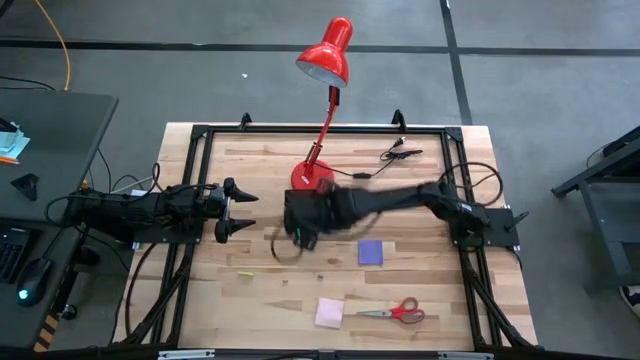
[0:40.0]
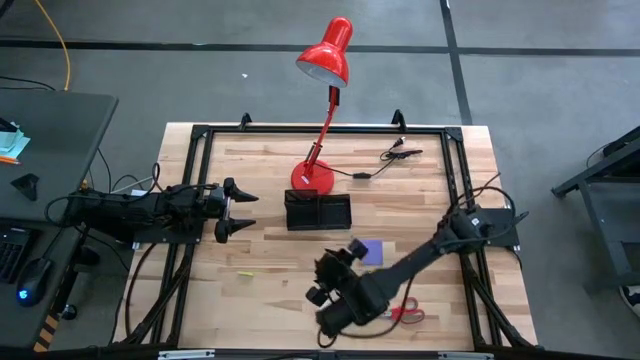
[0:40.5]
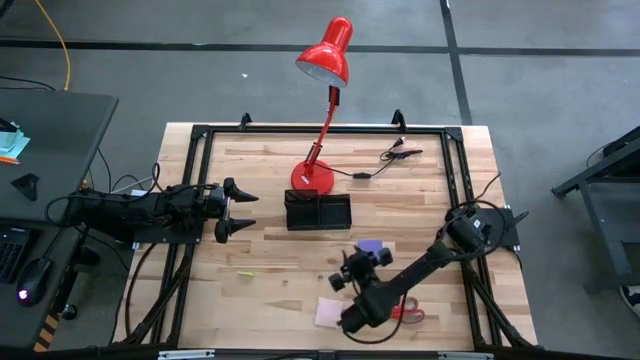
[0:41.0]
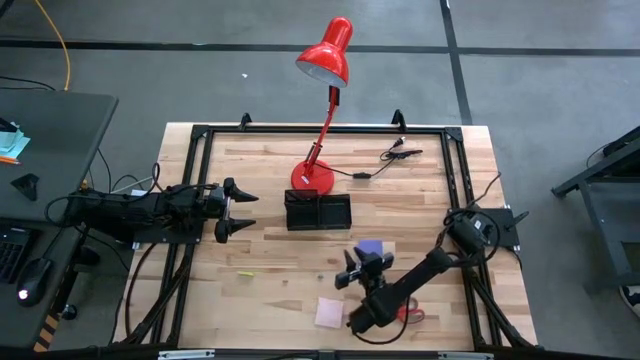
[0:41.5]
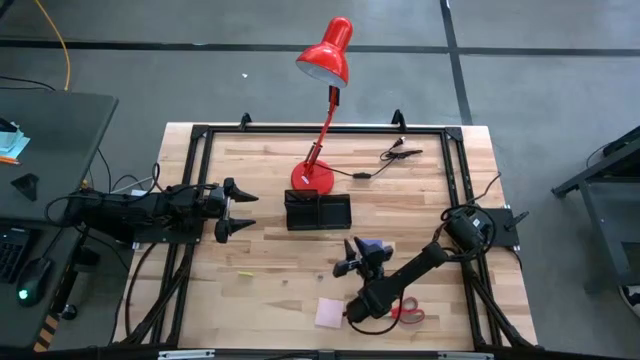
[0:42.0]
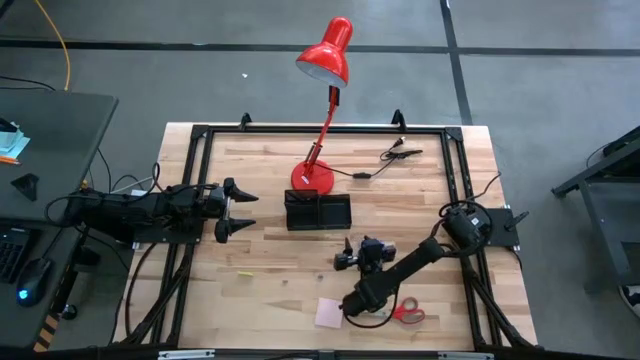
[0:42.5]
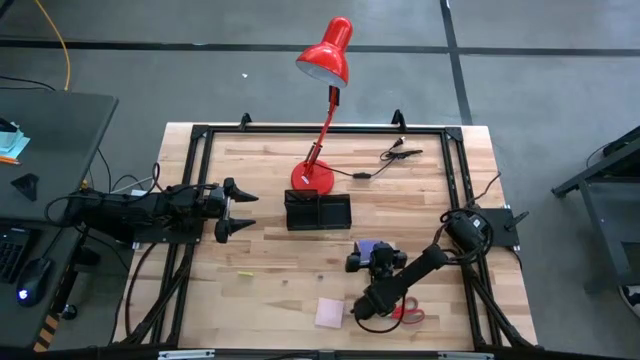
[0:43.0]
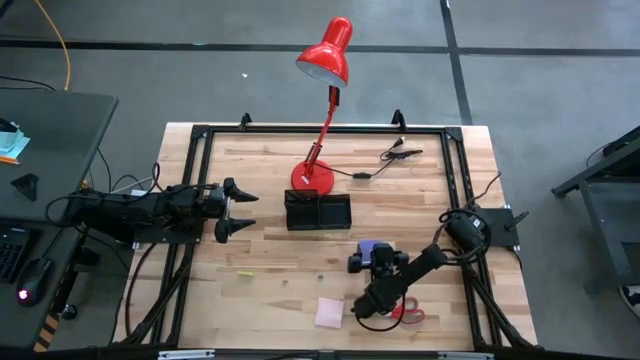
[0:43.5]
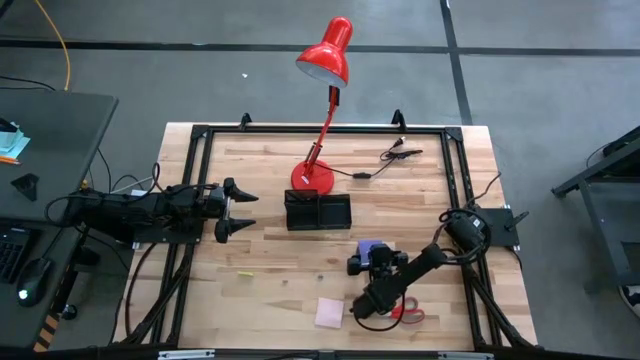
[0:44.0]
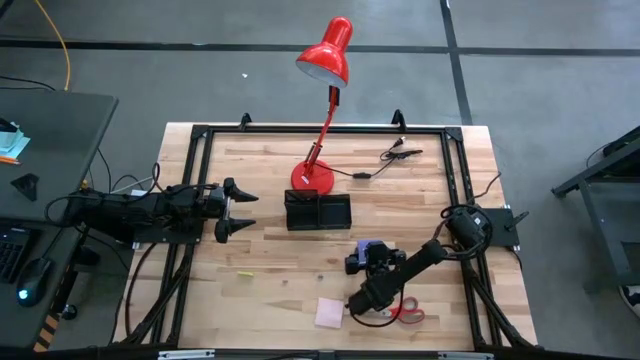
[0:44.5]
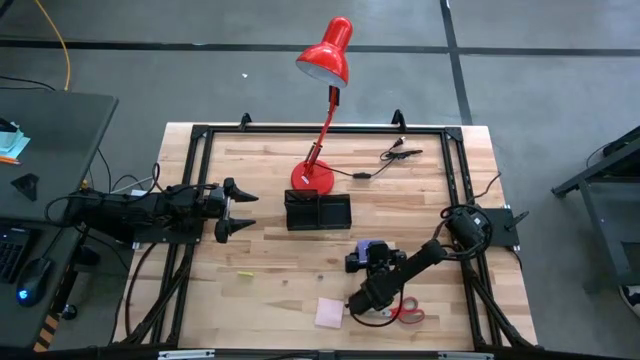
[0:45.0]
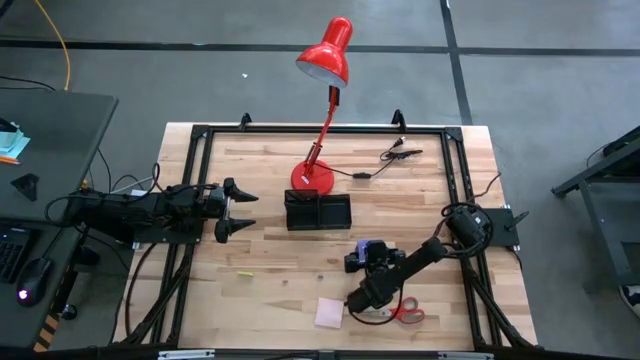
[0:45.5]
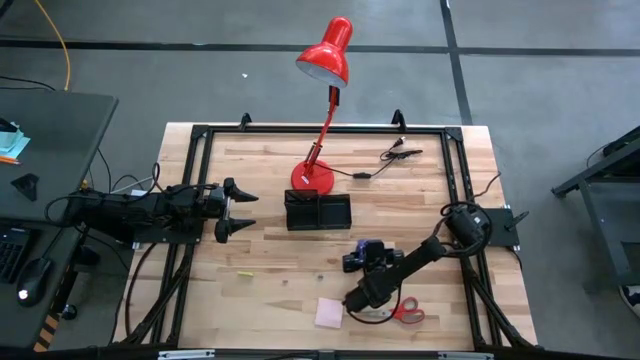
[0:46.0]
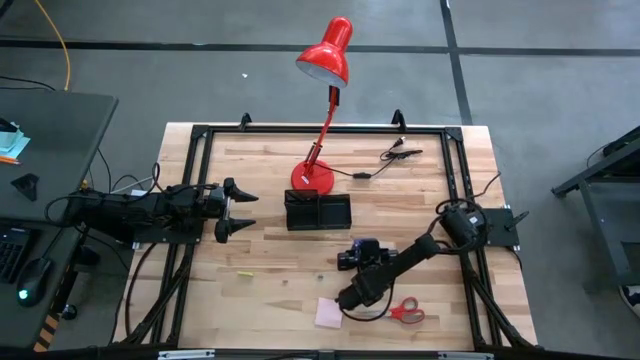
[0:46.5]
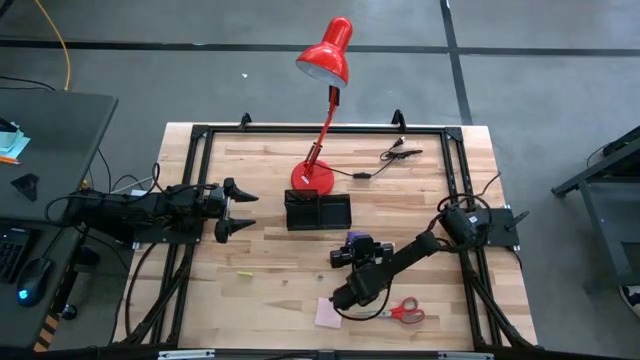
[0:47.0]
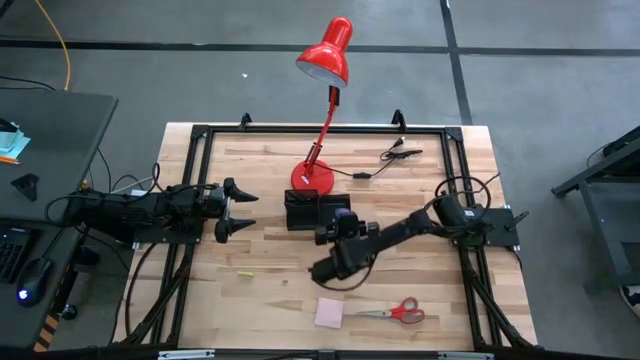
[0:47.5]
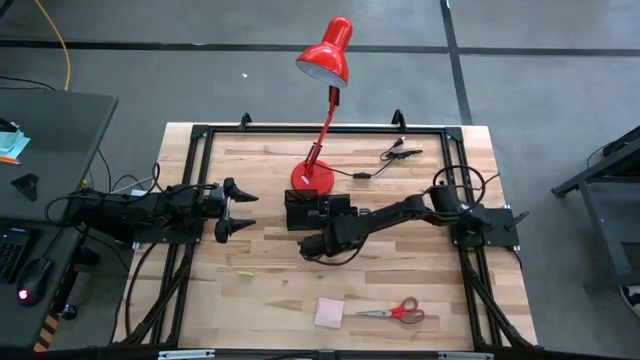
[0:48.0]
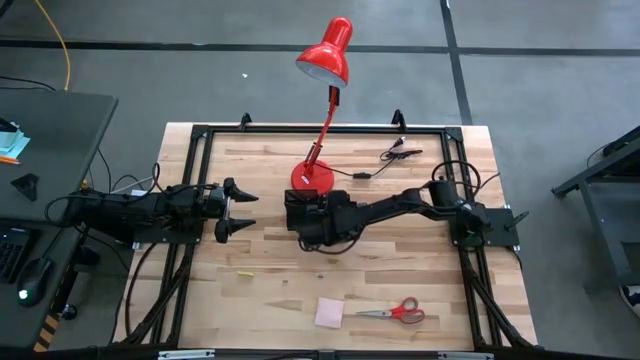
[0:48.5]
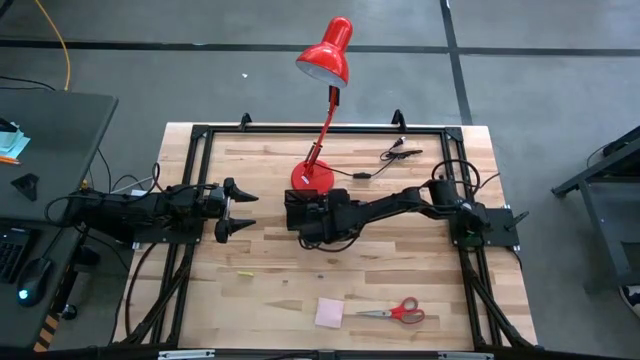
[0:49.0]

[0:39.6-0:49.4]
Task: Pick and place office supplies into organizer
Put the violet sticky notes into the black desk organizer

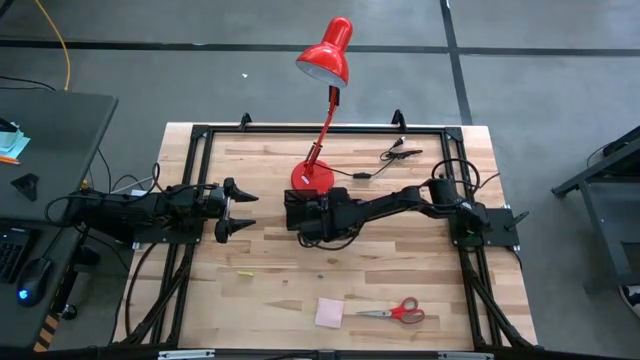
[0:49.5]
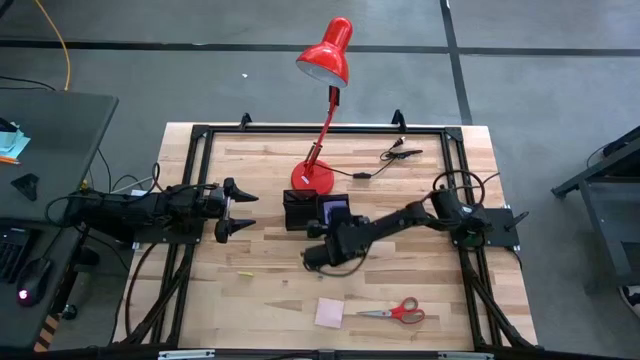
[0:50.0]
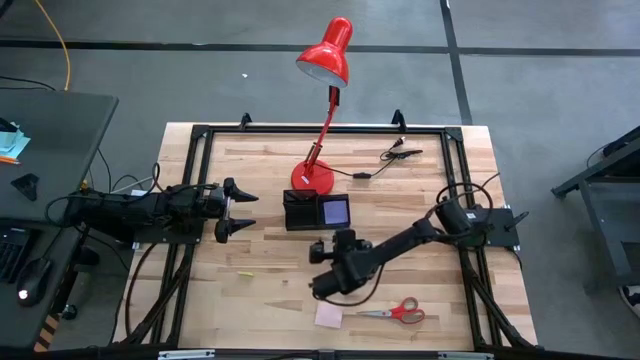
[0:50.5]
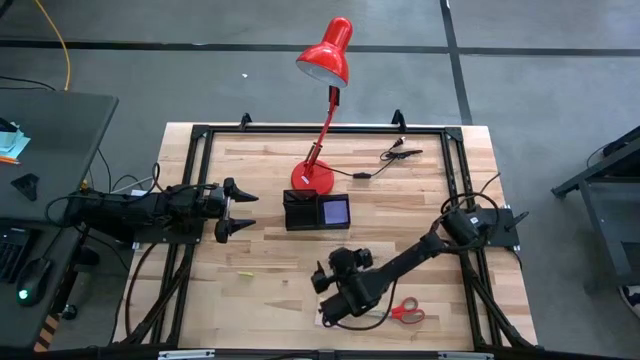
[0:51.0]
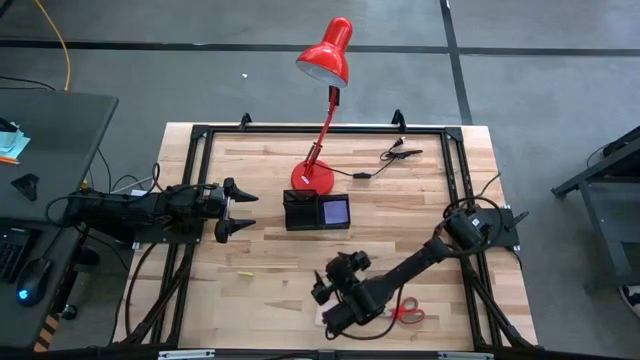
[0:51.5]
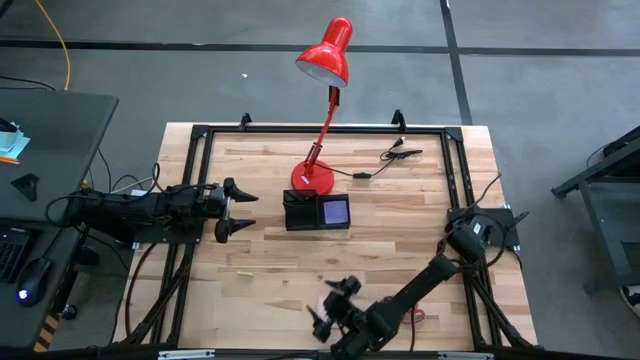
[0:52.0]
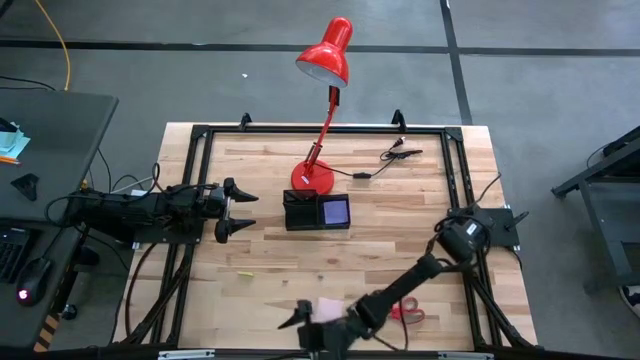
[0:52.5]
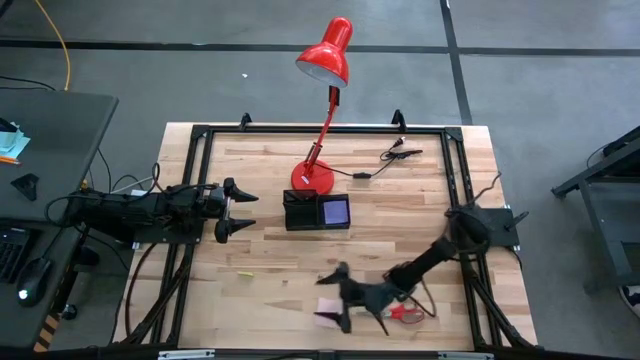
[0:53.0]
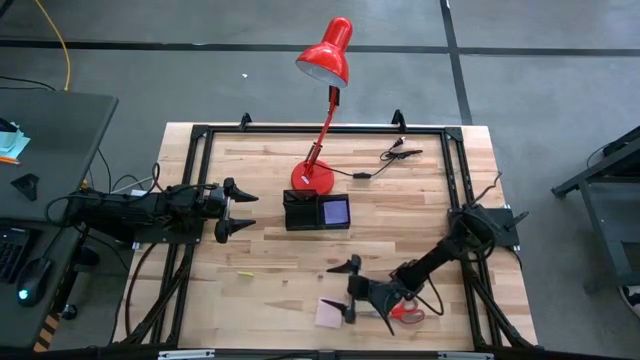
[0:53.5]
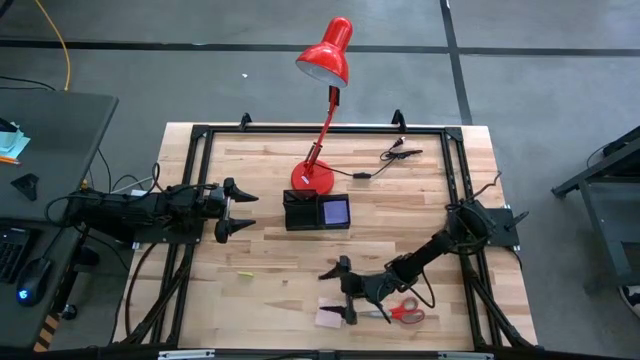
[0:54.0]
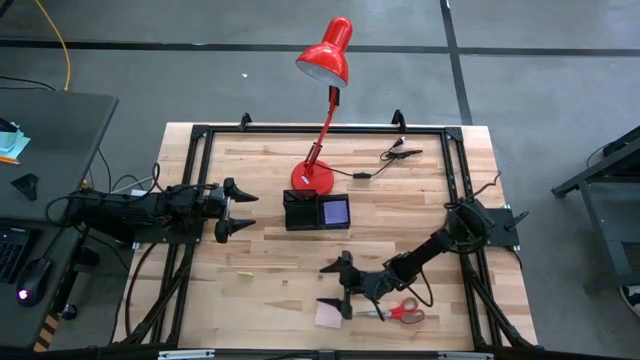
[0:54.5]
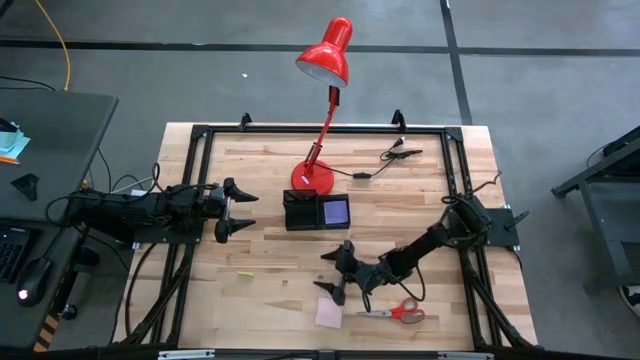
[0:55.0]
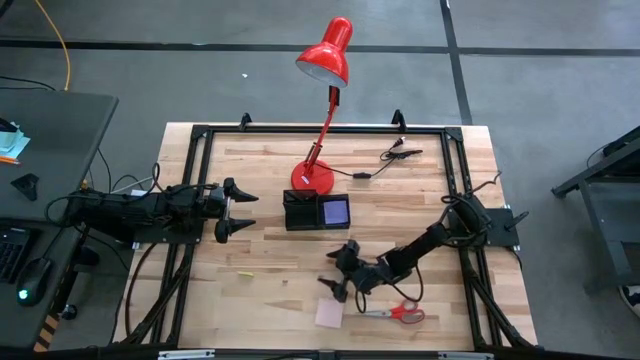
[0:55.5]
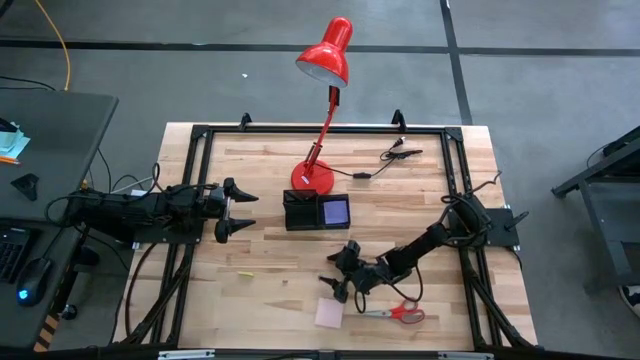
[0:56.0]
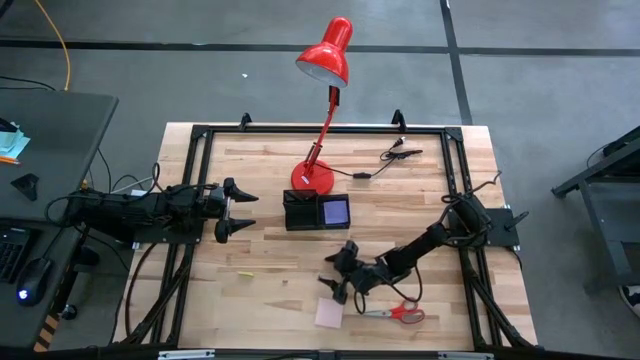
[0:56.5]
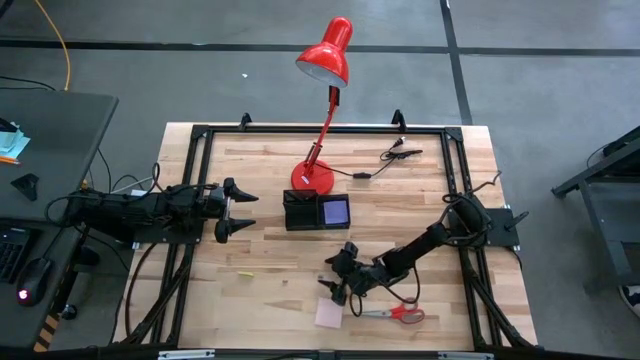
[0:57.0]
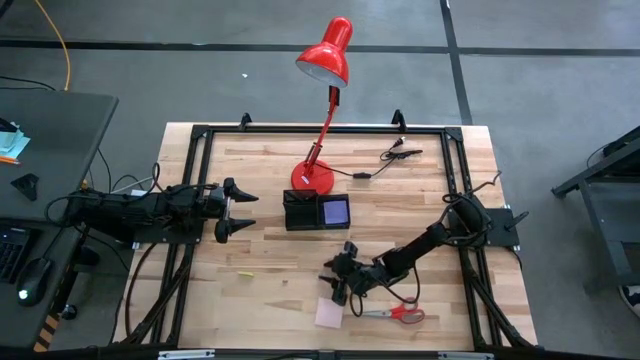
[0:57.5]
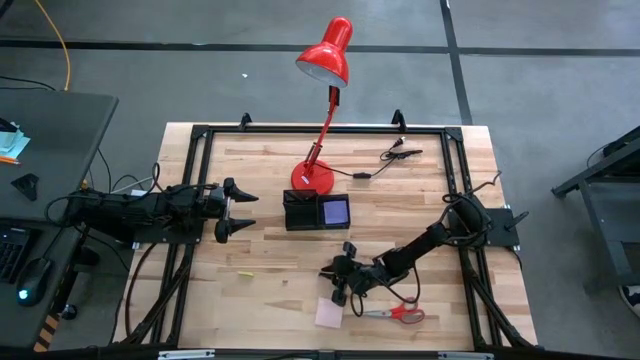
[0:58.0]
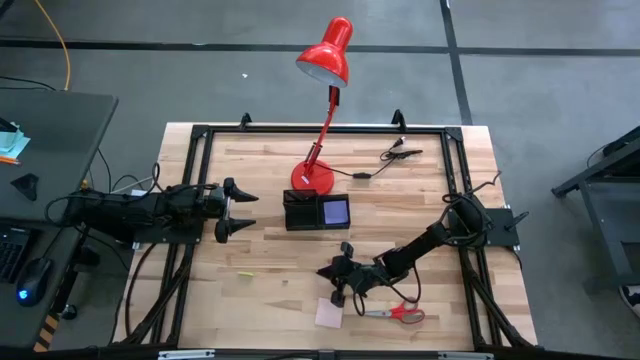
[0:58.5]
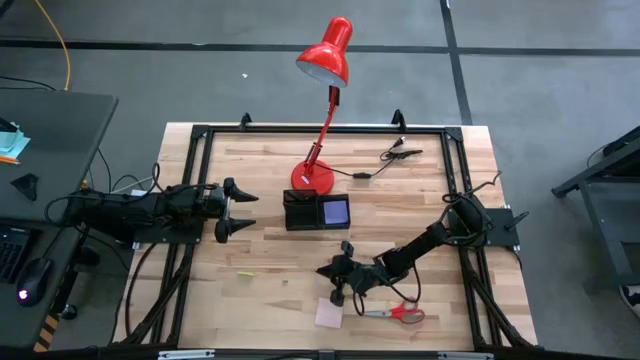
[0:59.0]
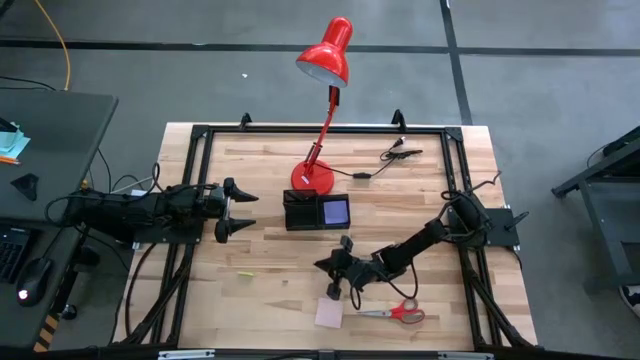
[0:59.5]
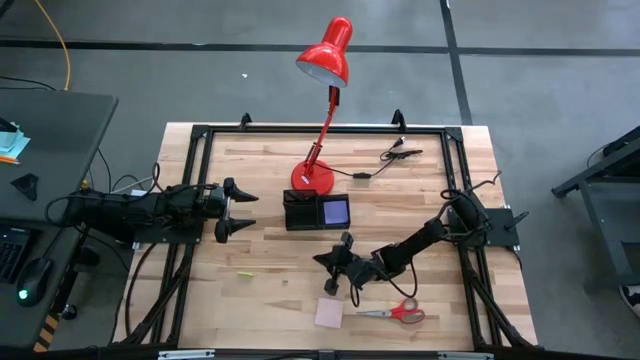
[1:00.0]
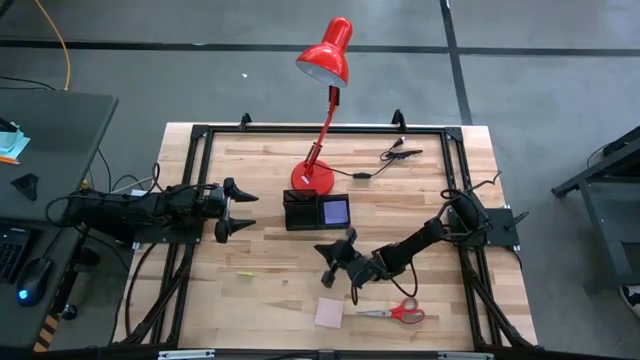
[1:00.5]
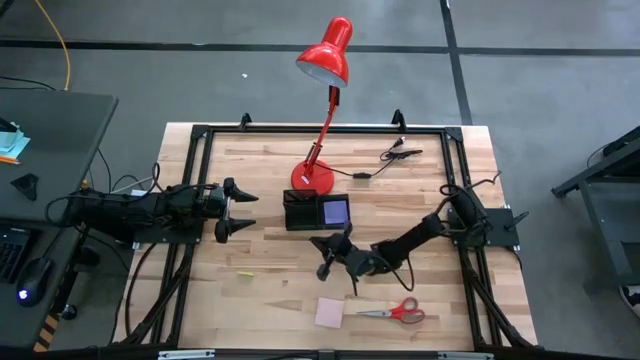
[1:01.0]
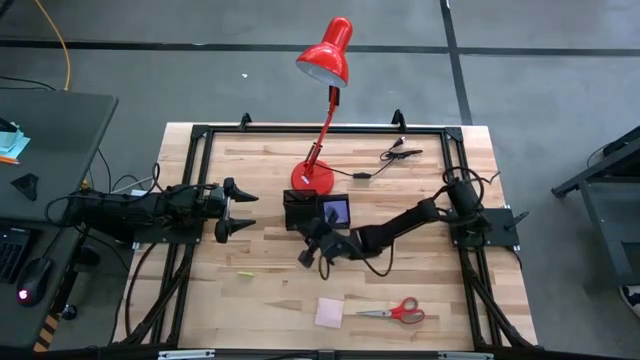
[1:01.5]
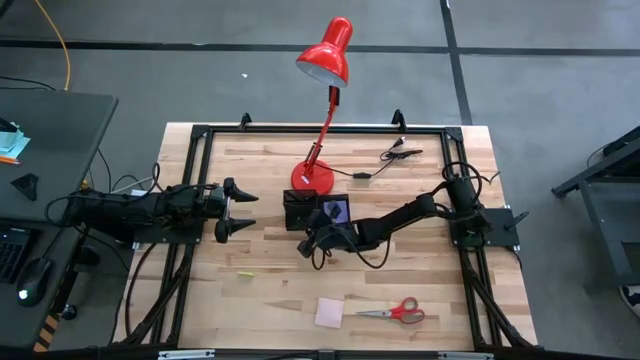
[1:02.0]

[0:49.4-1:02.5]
Put the blue binder clip into the black desk organizer
